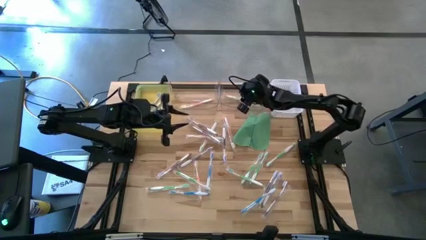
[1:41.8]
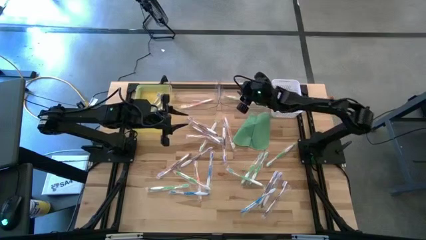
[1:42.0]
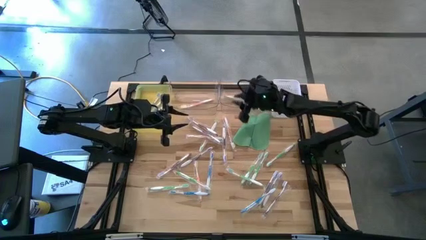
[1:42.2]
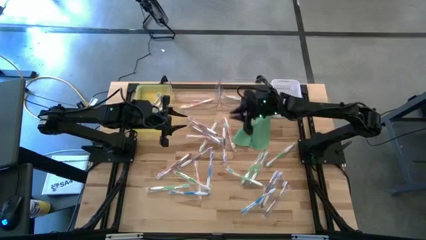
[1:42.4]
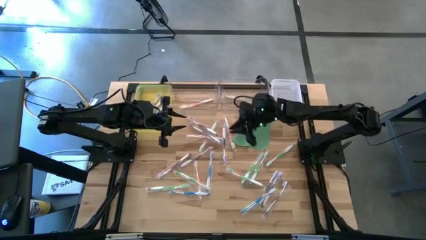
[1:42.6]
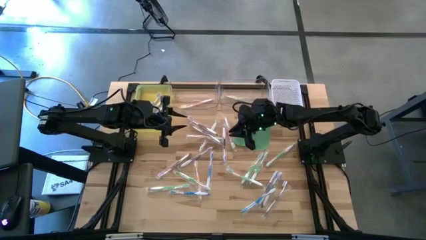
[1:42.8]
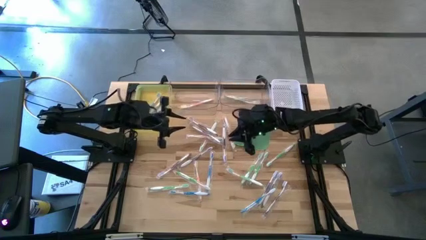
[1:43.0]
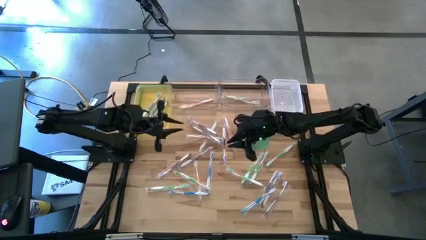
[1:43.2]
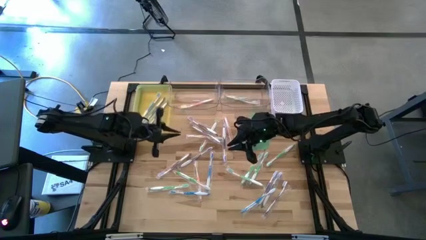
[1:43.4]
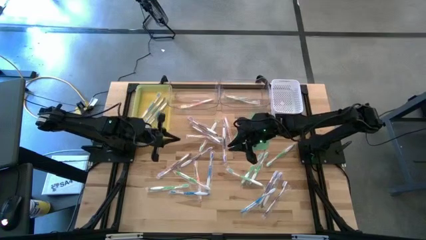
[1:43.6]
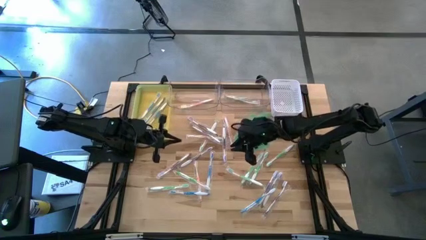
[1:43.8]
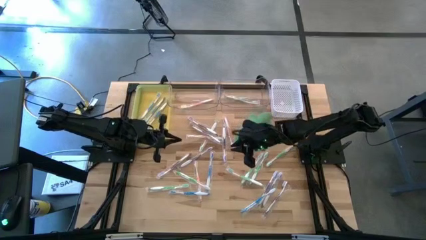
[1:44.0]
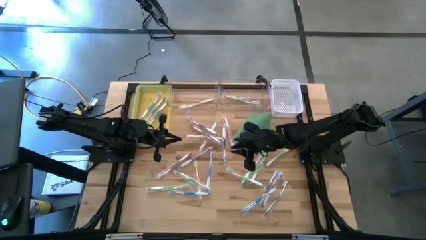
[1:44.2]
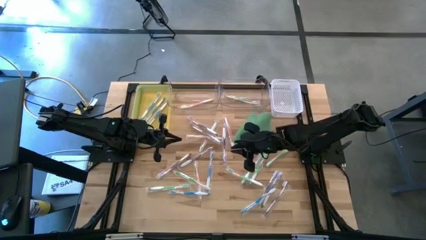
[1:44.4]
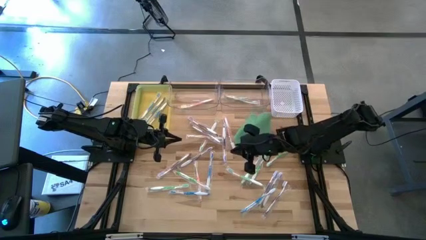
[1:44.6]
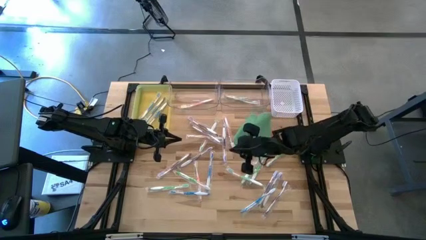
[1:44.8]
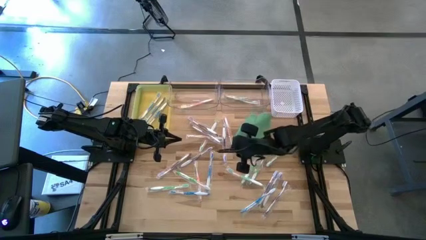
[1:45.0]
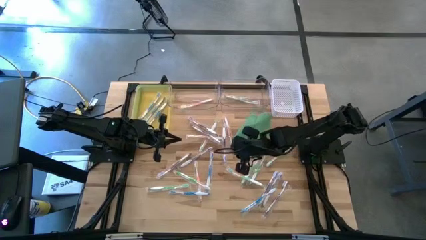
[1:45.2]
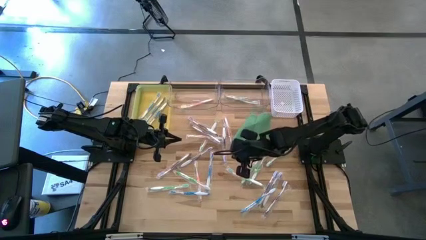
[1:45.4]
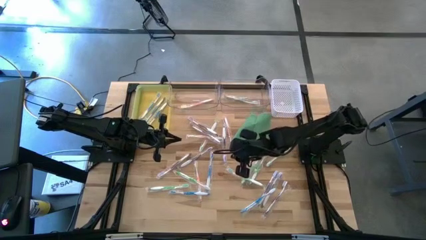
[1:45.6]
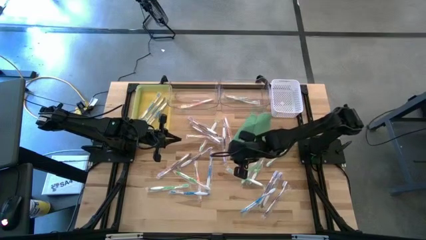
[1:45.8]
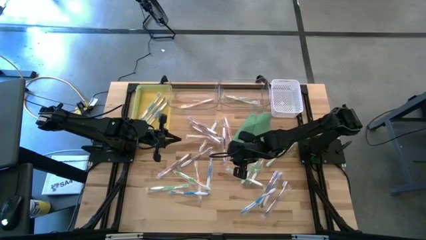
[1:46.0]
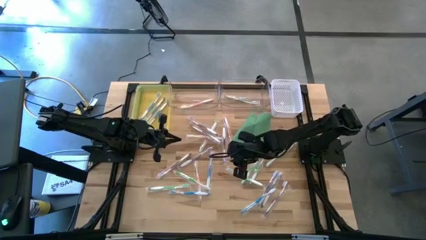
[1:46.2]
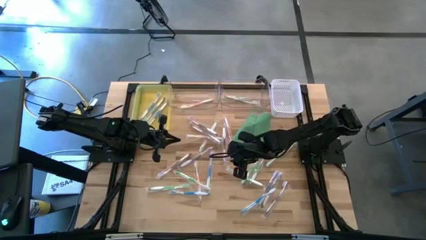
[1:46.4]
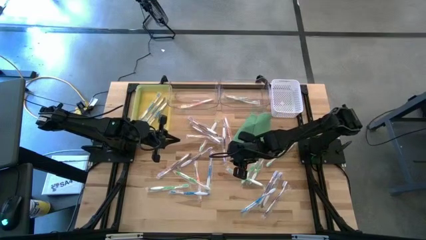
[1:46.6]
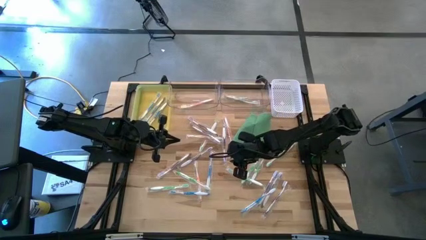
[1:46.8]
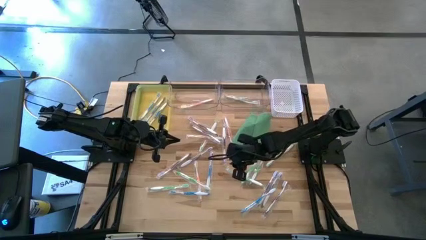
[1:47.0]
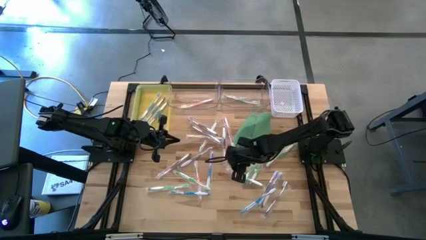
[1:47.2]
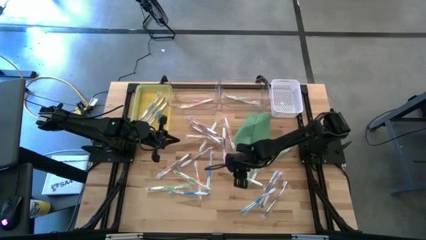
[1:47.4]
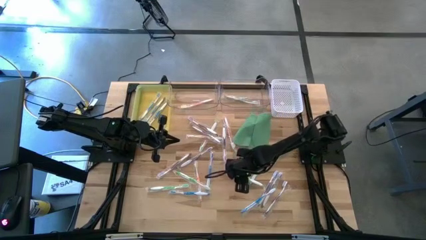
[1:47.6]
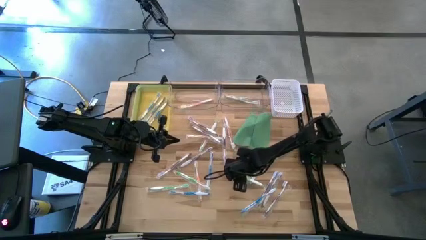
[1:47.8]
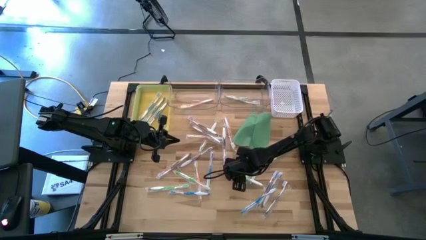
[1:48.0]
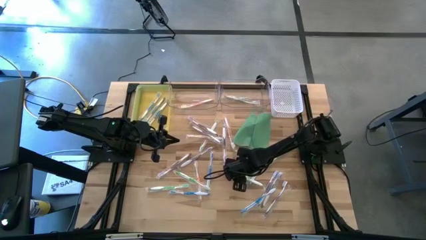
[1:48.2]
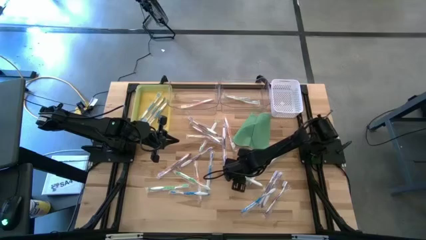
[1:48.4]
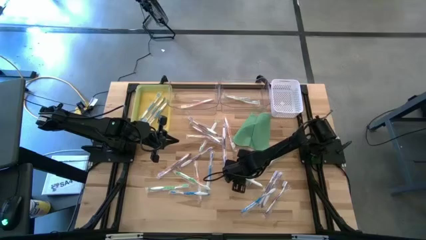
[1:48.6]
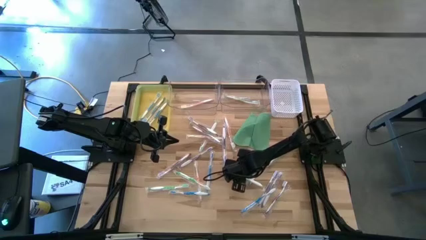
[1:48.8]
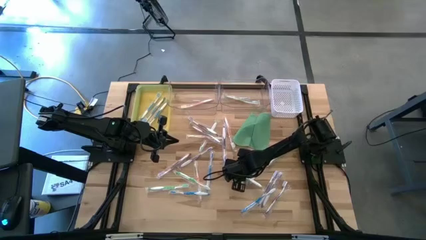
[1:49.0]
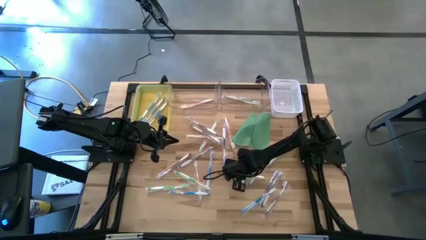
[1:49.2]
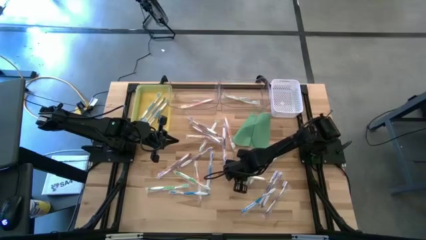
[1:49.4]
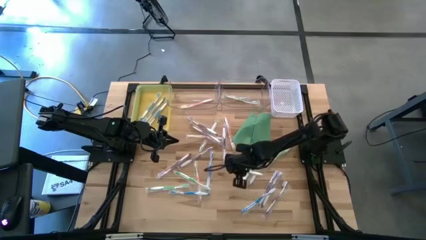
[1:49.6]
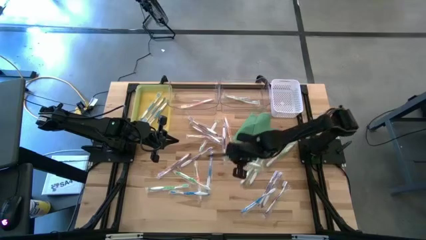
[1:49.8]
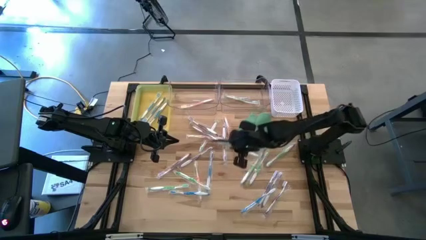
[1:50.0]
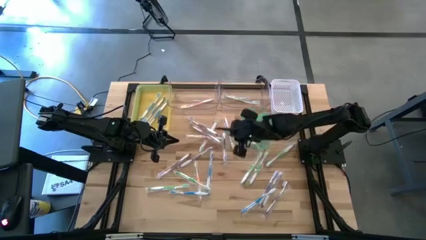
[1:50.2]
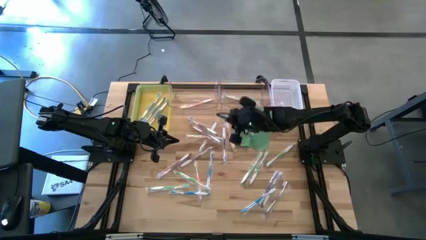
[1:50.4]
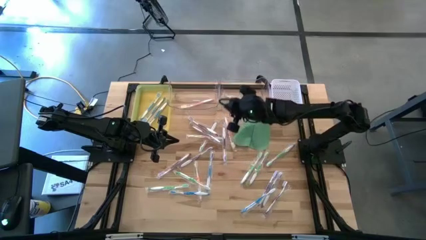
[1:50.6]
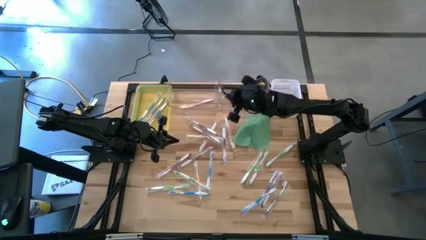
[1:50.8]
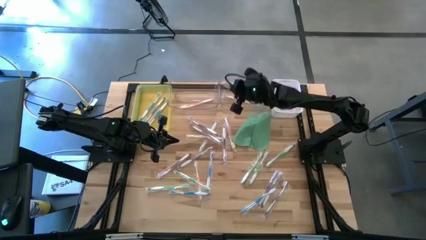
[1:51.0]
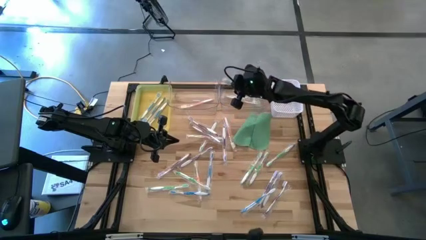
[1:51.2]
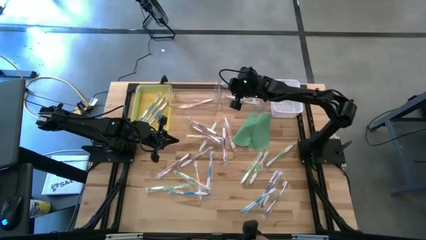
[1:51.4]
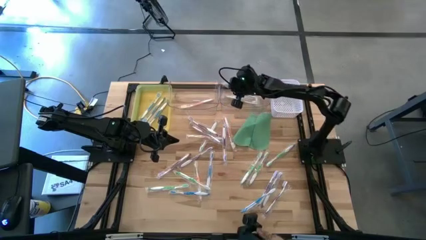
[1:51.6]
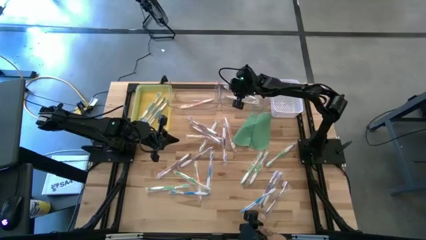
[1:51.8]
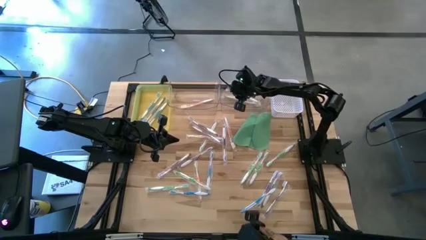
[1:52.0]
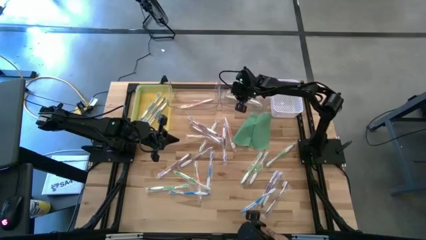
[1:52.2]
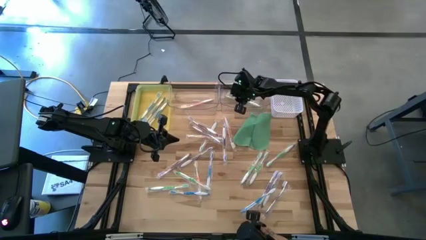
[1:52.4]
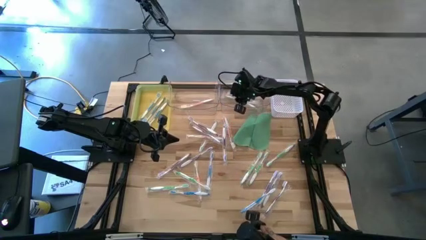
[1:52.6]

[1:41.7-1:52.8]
Task: Pick & Place Toothbrushes
Put the green toothbrush into the right transparent bin
